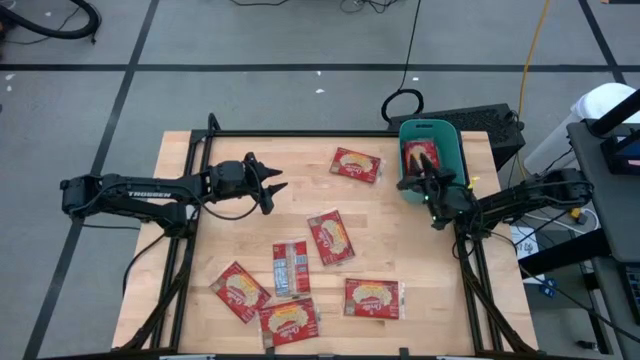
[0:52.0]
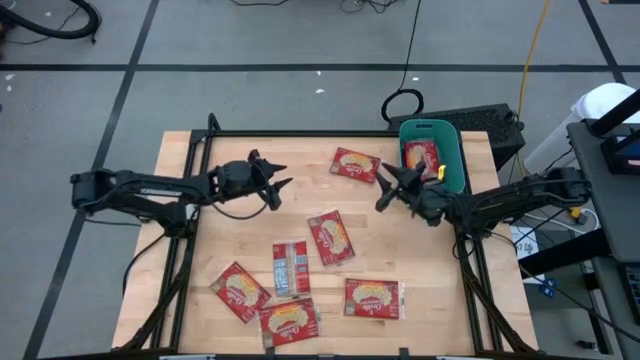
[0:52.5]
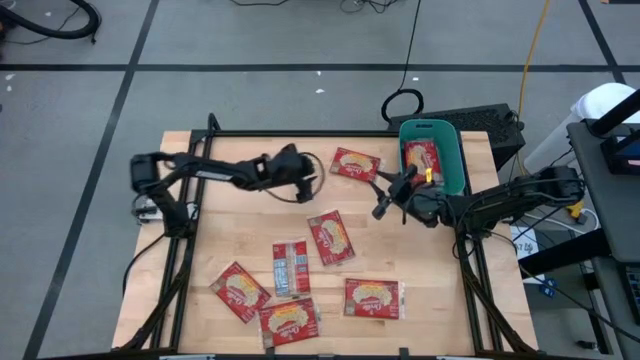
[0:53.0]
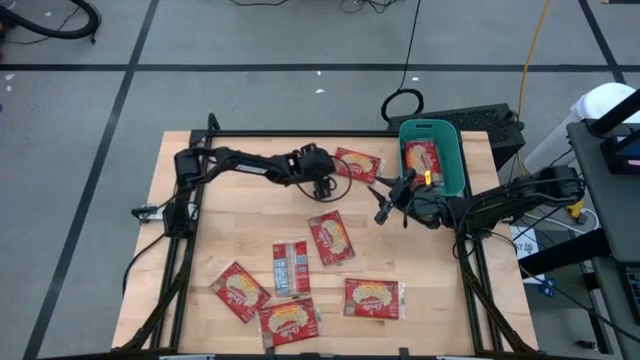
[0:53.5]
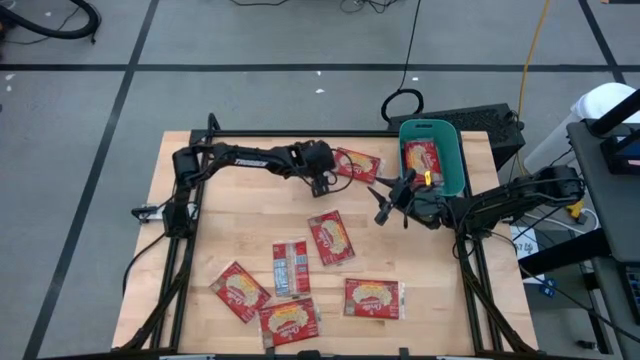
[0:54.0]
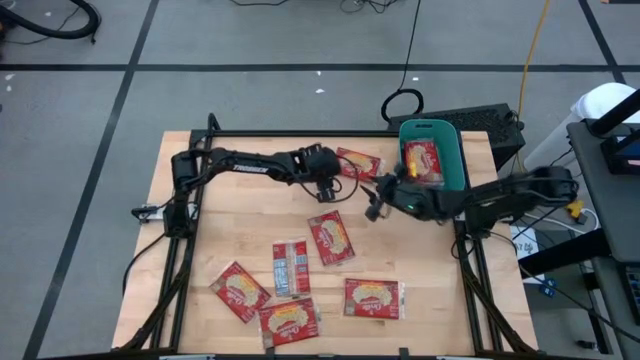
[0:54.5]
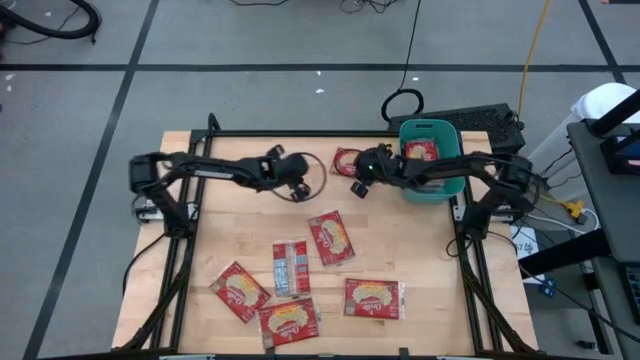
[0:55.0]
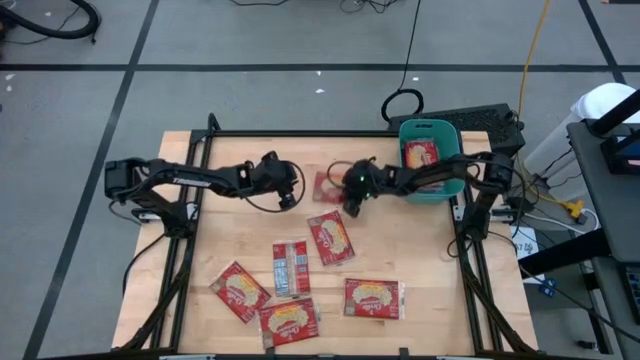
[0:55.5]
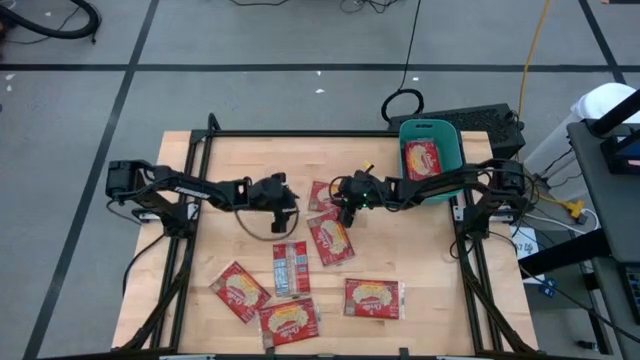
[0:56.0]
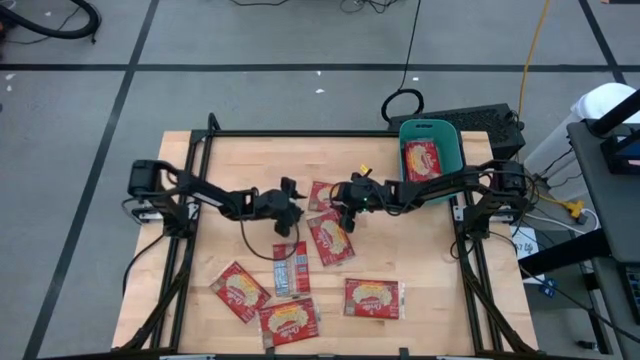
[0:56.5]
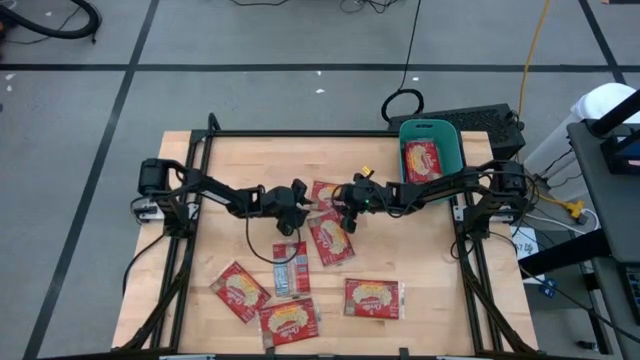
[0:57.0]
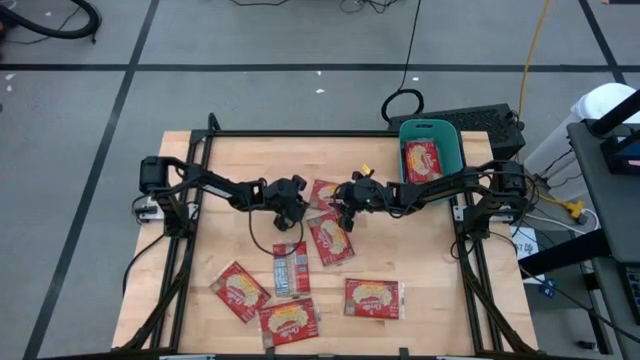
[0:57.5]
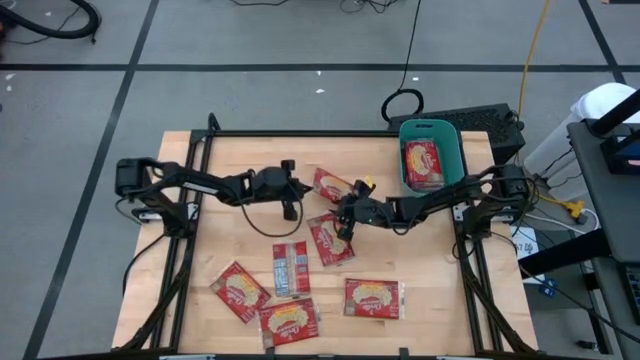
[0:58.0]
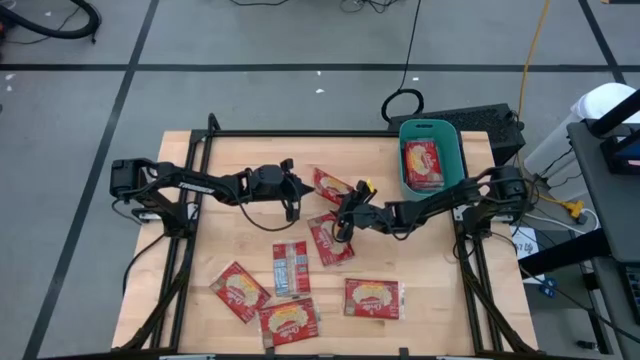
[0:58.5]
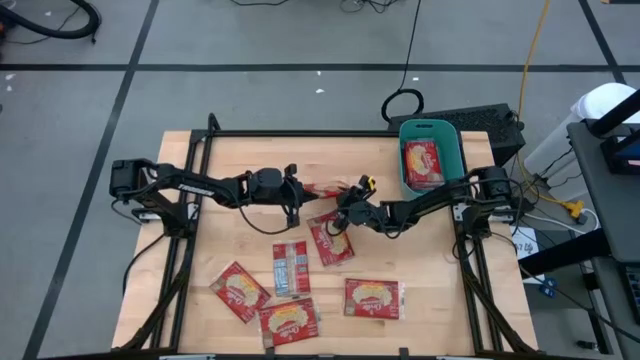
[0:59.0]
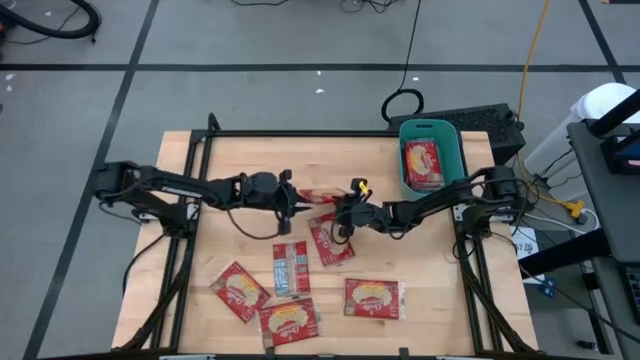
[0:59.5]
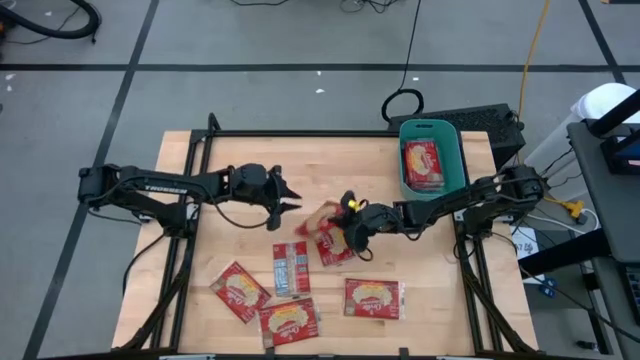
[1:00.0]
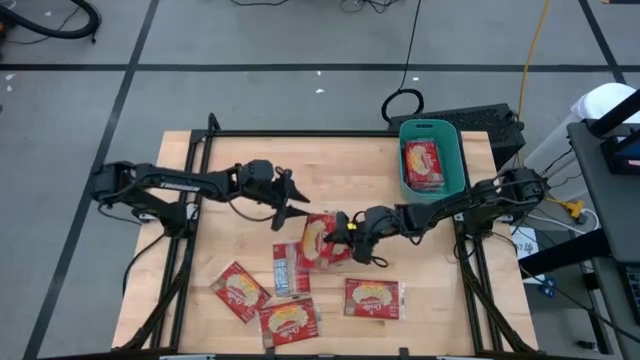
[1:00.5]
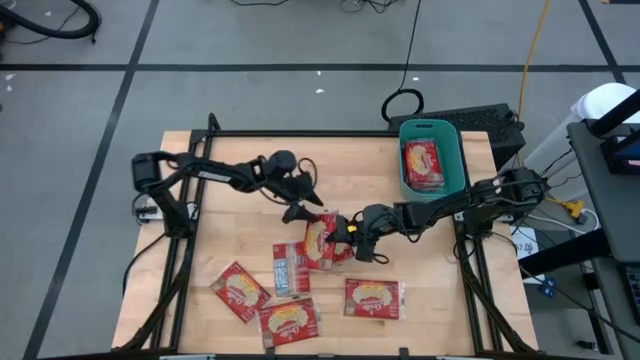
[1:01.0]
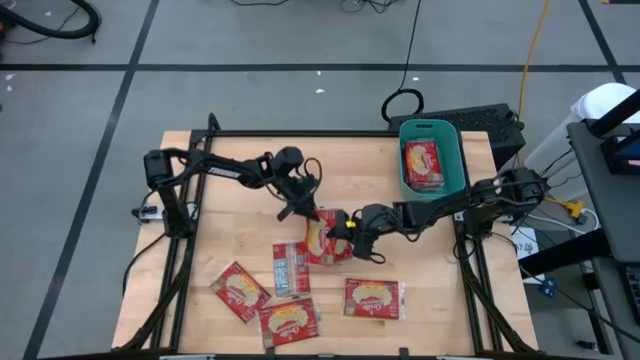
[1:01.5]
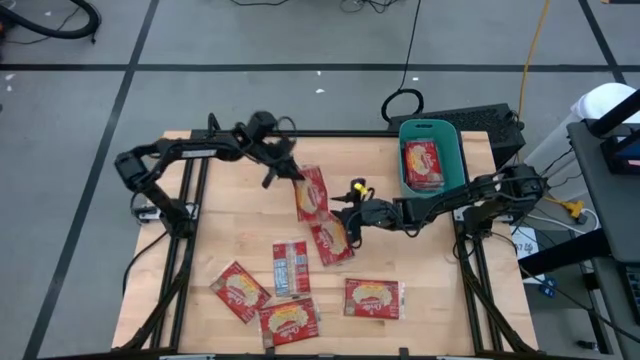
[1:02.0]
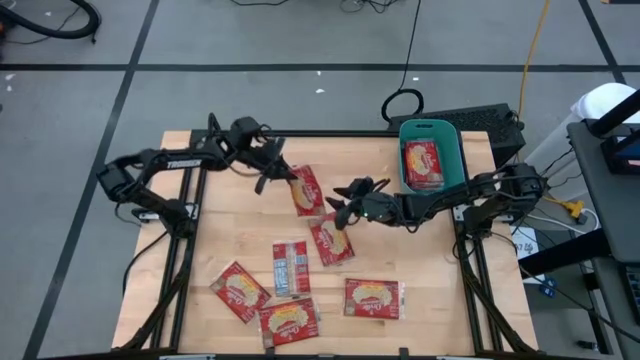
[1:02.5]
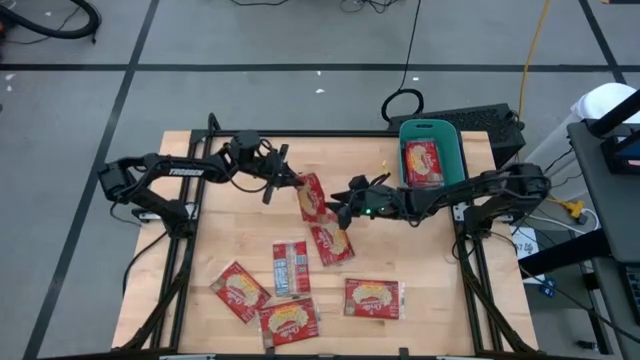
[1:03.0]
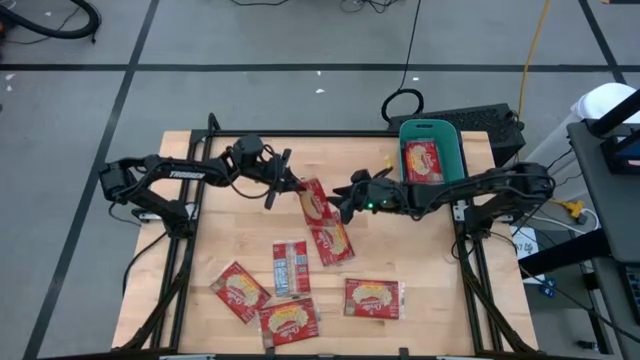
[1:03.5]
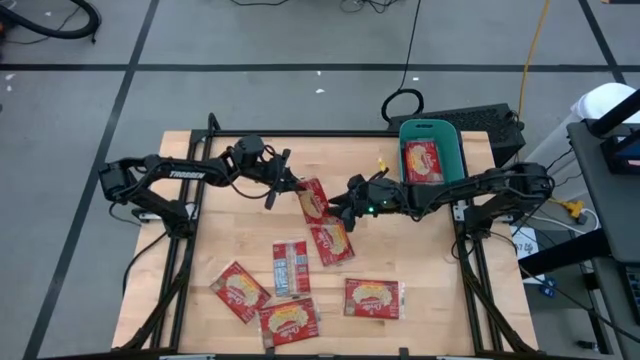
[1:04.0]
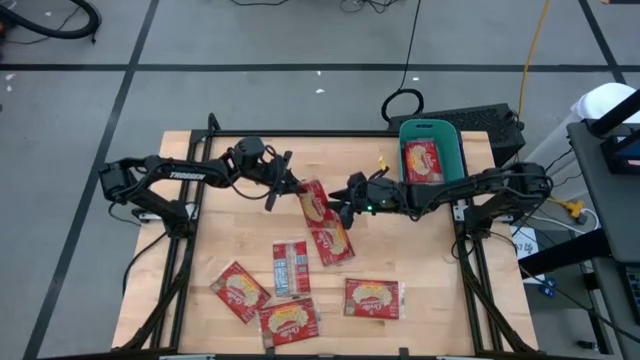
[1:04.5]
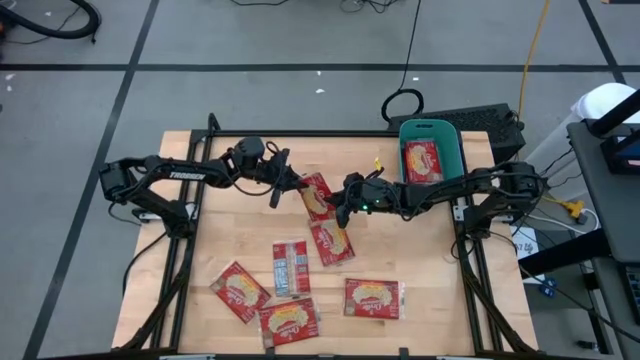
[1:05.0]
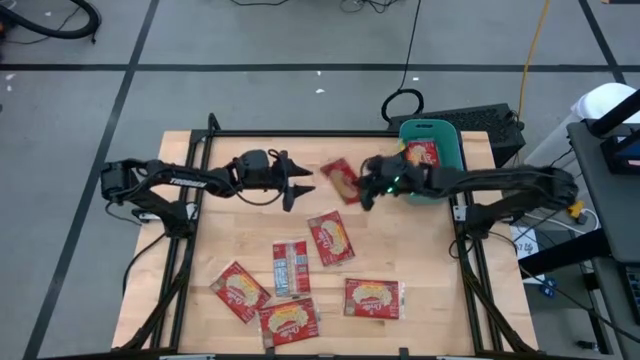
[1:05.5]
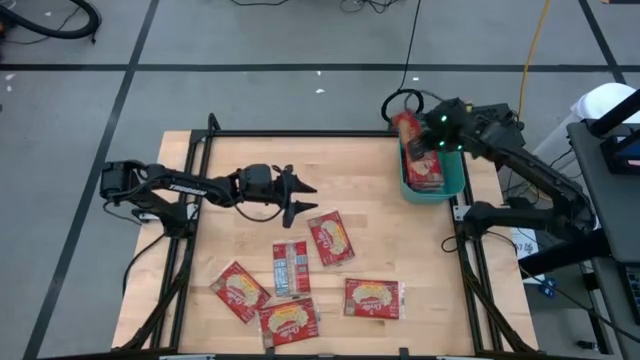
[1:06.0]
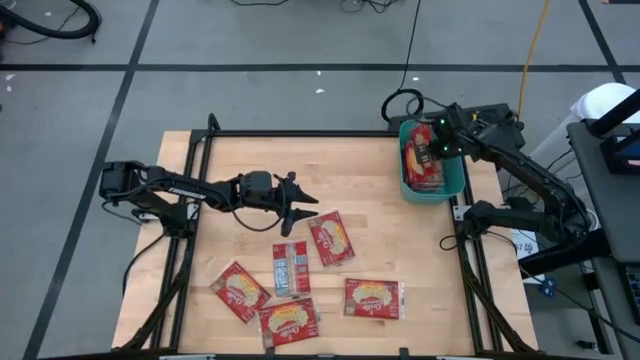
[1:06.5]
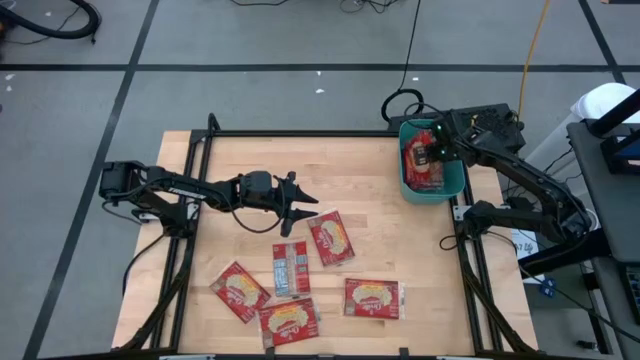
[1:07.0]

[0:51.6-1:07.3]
Task: Sort popcorn bags into baskets
Put the red popcorn bag into the green bin

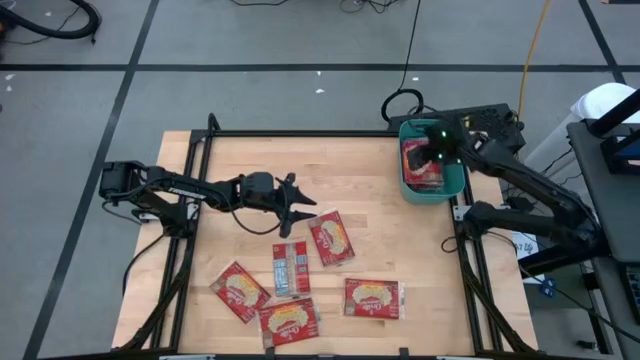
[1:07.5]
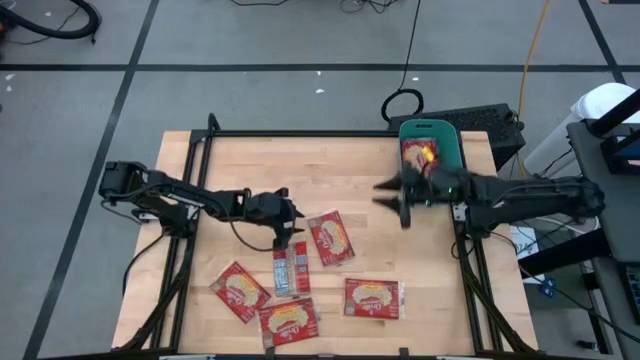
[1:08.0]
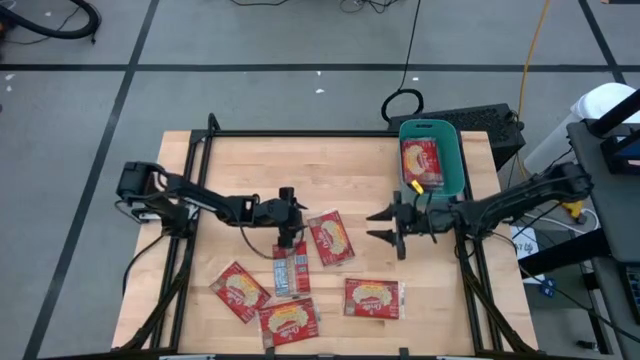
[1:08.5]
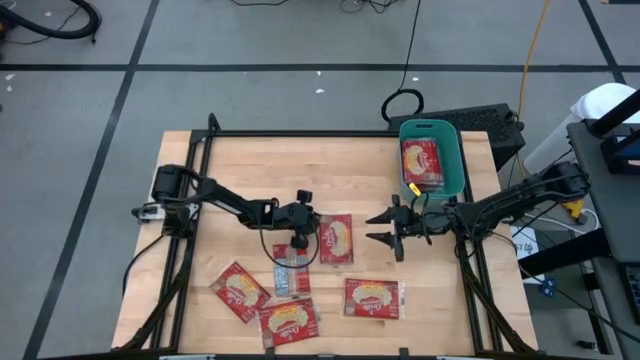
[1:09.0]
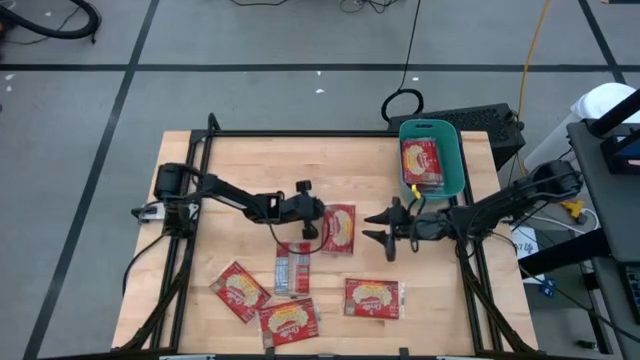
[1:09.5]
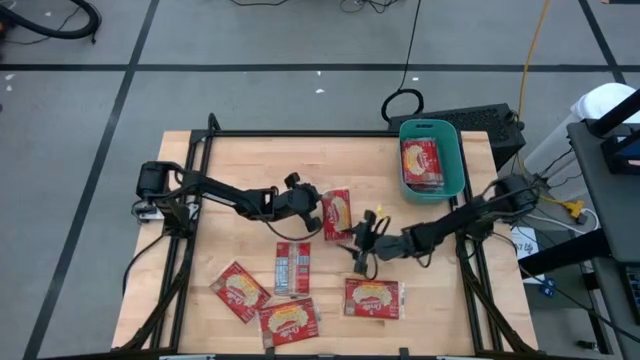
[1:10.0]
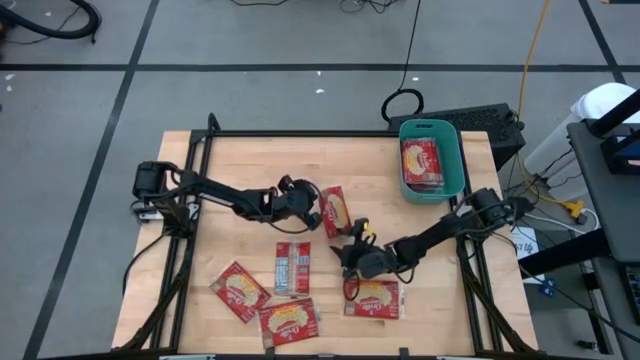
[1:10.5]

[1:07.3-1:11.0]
Put the red popcorn bag into the green bin

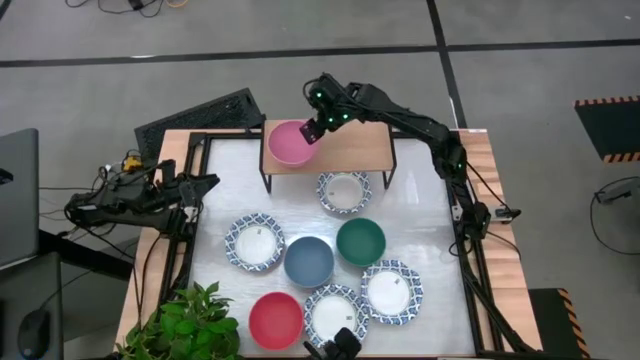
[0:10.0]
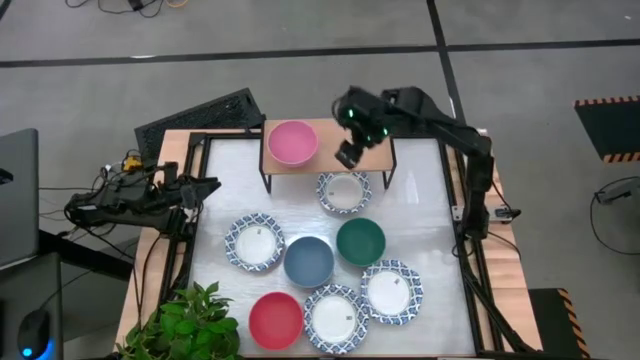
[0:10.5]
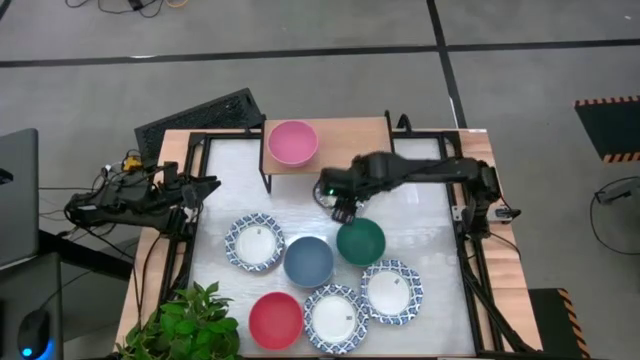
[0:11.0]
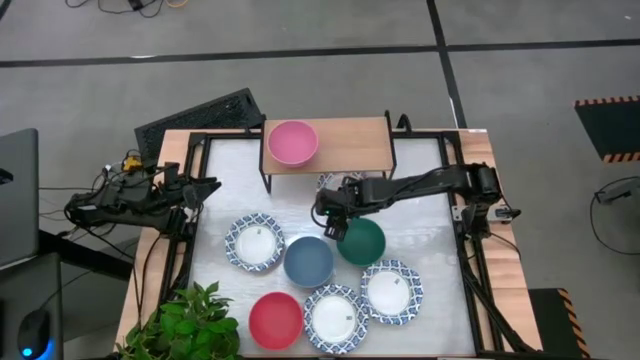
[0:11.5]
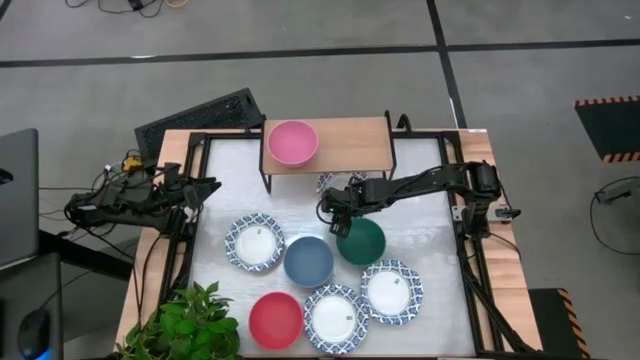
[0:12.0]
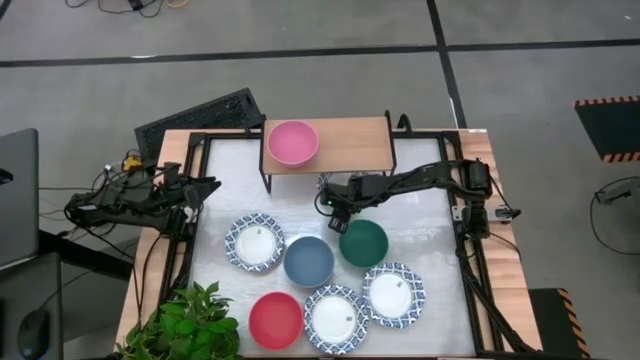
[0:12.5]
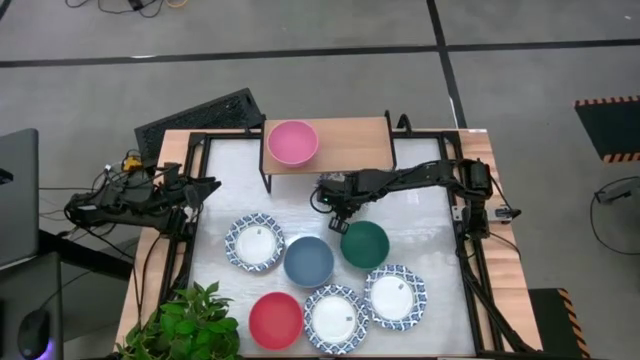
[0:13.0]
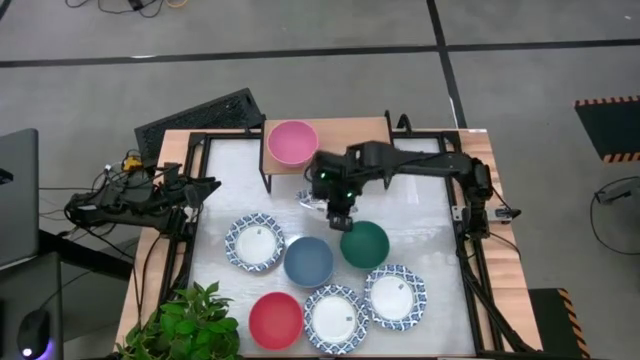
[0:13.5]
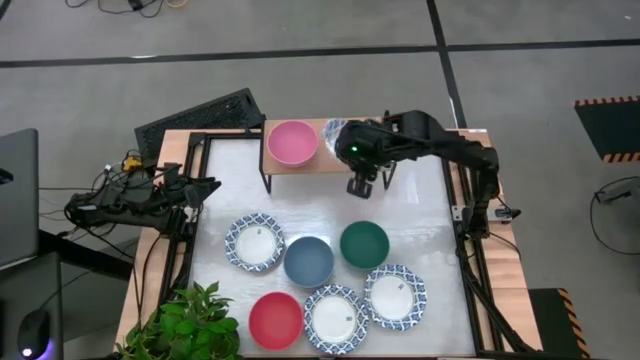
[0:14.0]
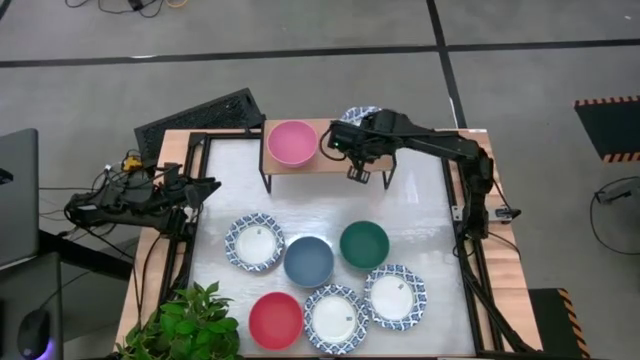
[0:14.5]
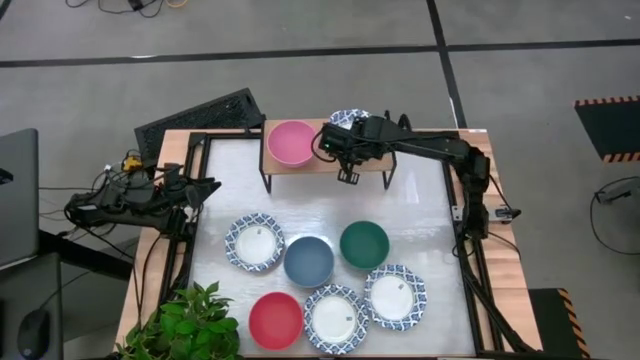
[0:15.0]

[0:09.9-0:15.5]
Task: Place and stack bowls onto a shelf
Put the white patterned bowl on the shelf
